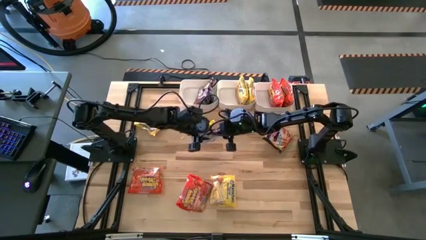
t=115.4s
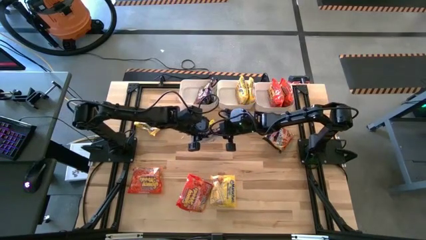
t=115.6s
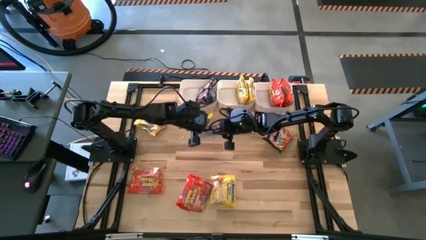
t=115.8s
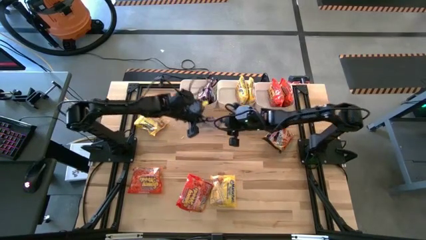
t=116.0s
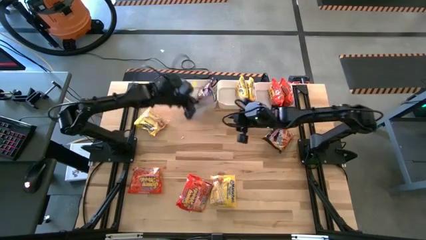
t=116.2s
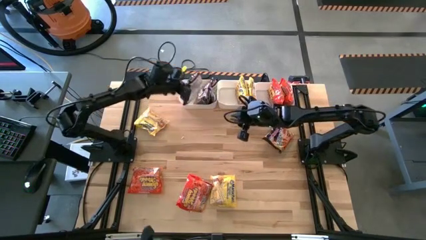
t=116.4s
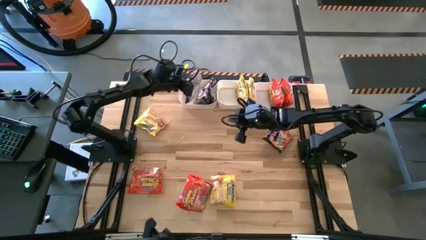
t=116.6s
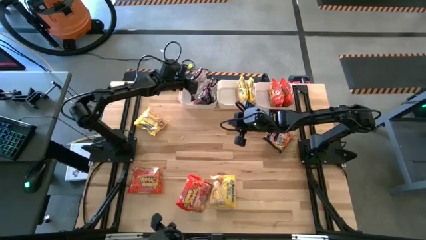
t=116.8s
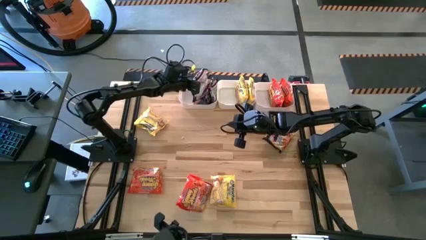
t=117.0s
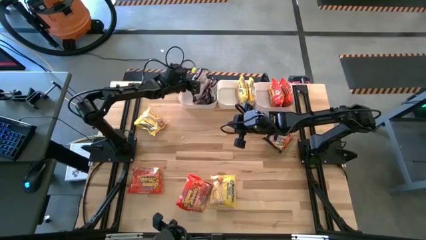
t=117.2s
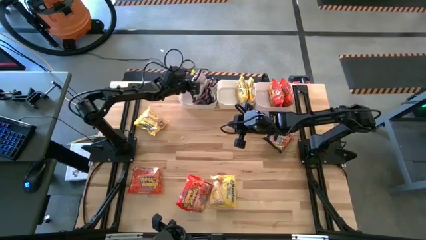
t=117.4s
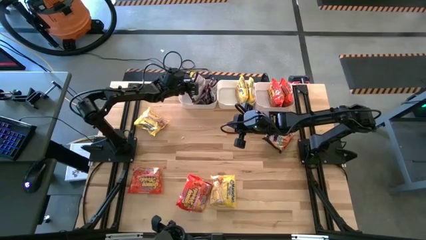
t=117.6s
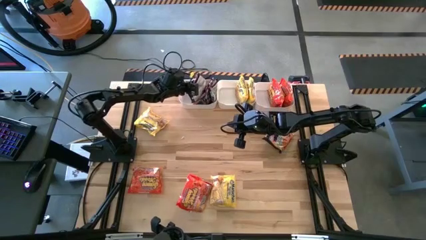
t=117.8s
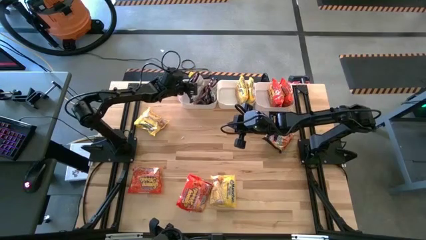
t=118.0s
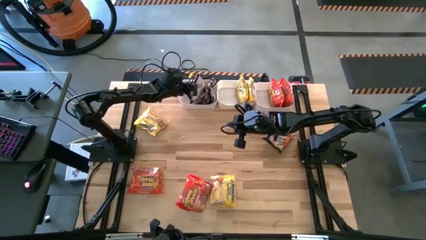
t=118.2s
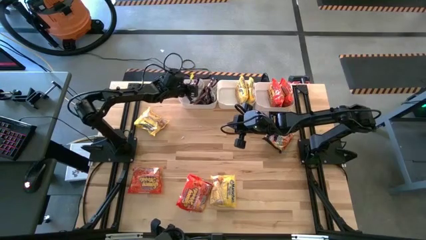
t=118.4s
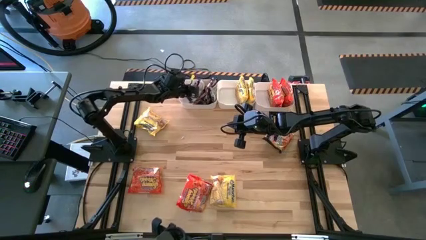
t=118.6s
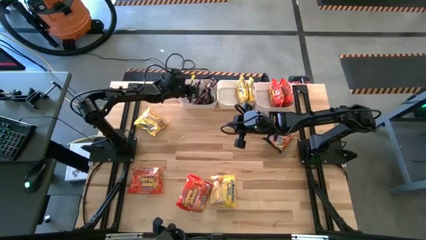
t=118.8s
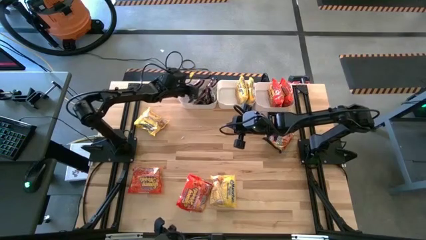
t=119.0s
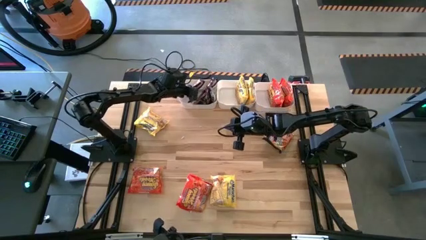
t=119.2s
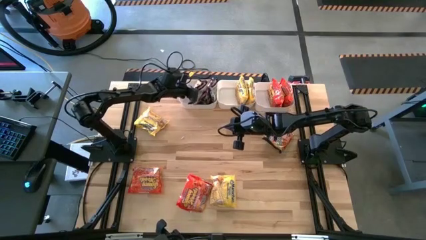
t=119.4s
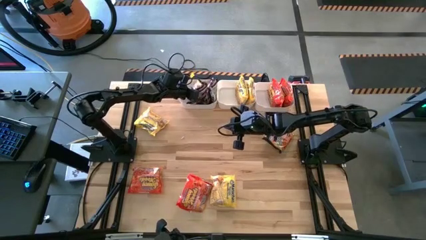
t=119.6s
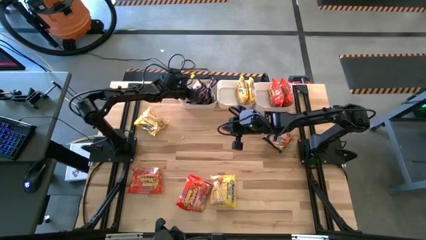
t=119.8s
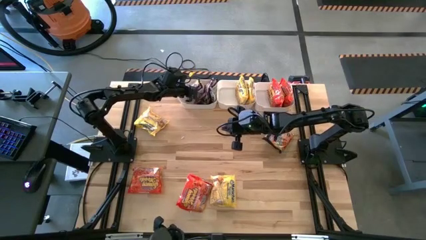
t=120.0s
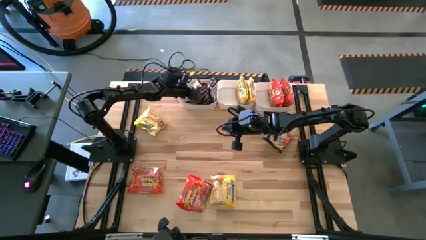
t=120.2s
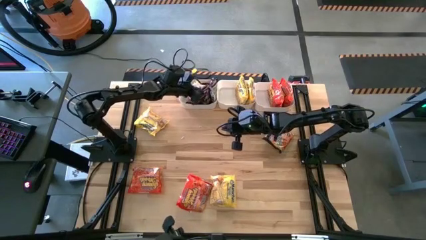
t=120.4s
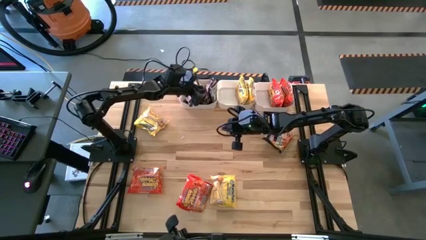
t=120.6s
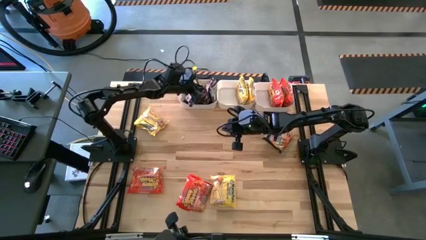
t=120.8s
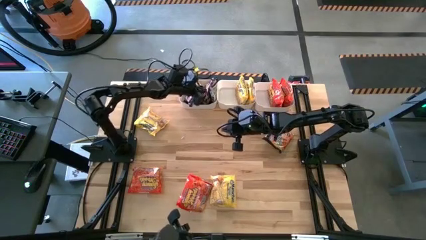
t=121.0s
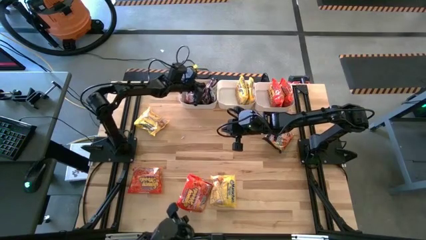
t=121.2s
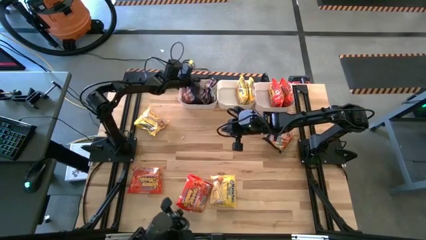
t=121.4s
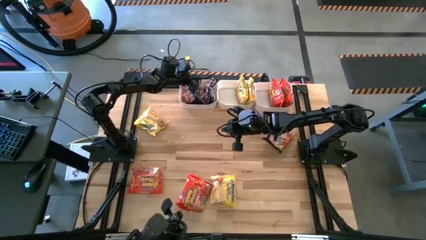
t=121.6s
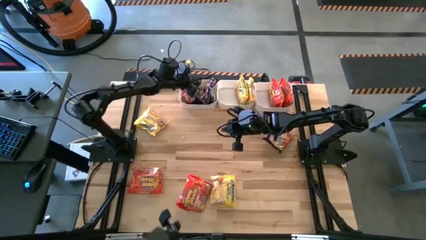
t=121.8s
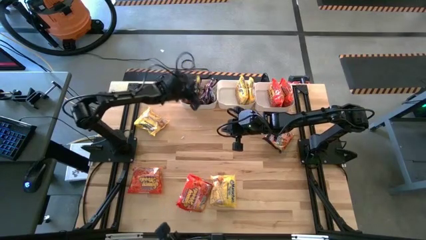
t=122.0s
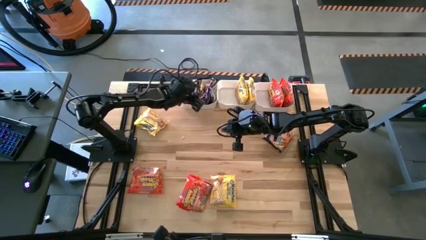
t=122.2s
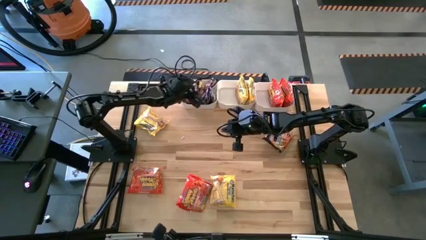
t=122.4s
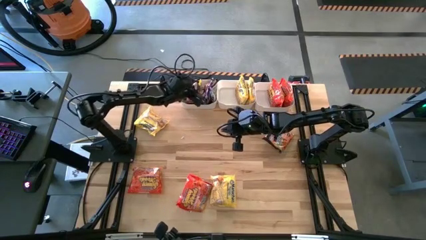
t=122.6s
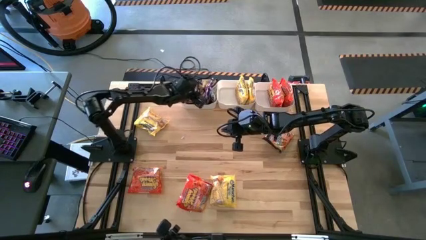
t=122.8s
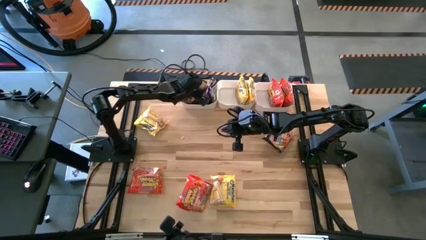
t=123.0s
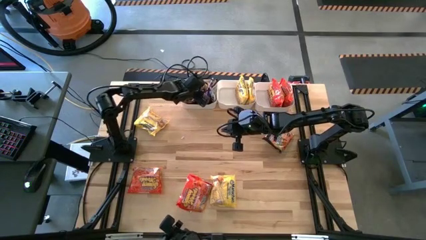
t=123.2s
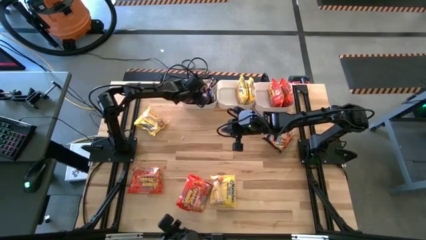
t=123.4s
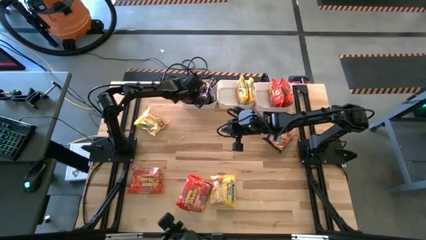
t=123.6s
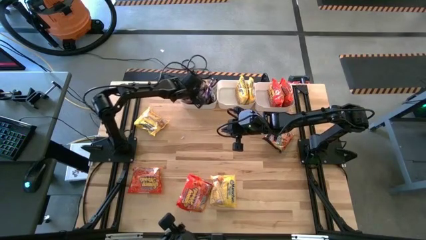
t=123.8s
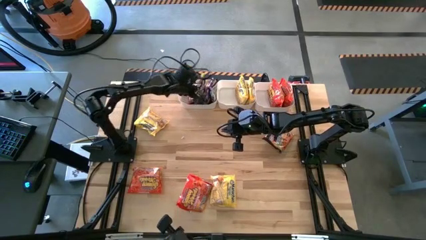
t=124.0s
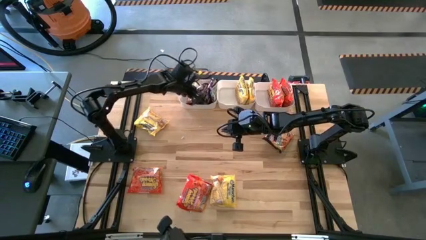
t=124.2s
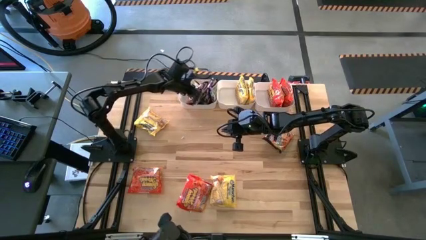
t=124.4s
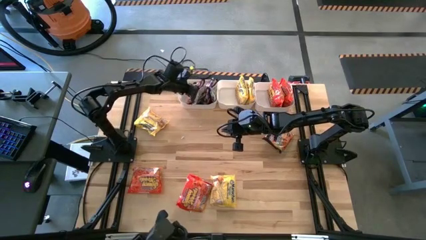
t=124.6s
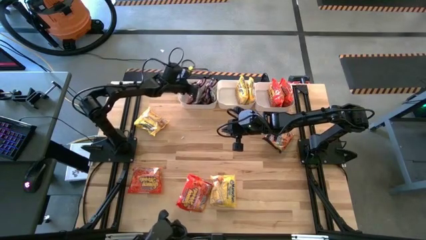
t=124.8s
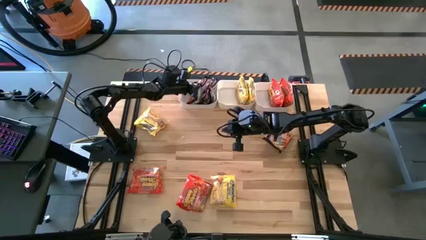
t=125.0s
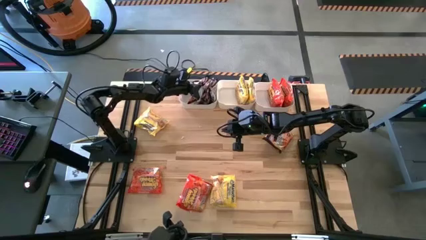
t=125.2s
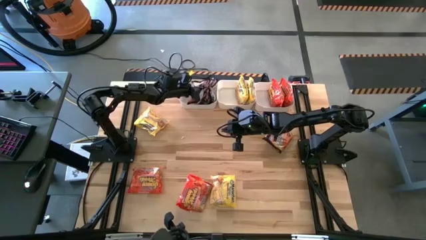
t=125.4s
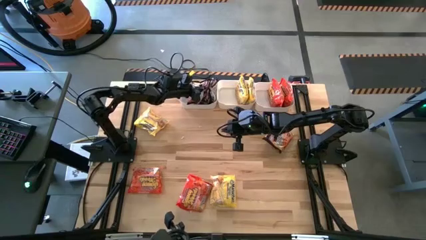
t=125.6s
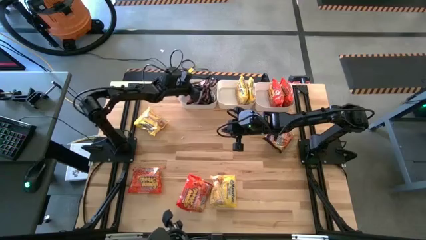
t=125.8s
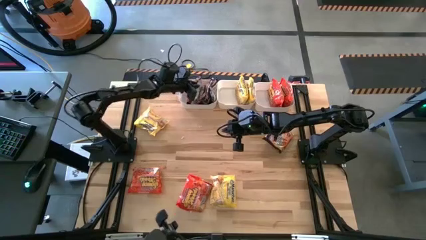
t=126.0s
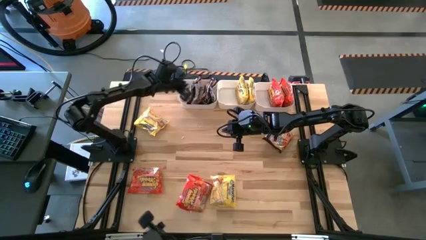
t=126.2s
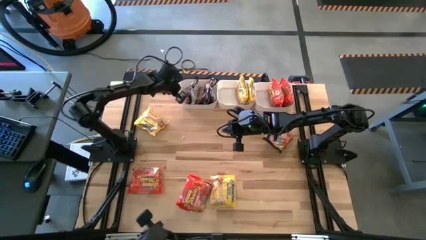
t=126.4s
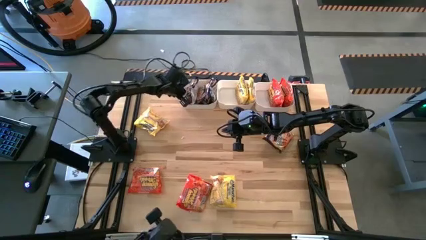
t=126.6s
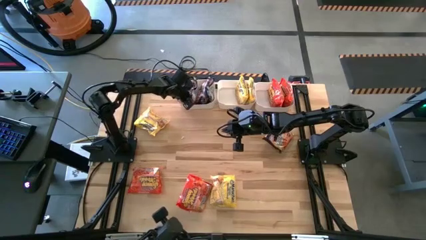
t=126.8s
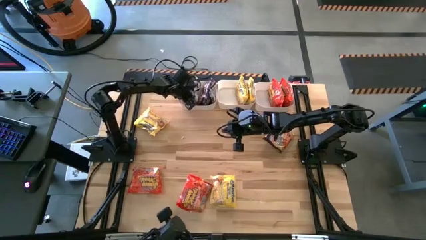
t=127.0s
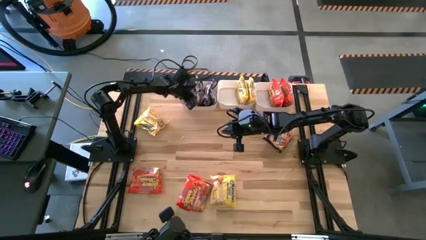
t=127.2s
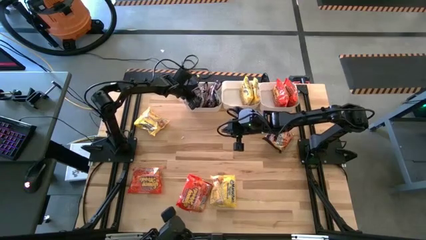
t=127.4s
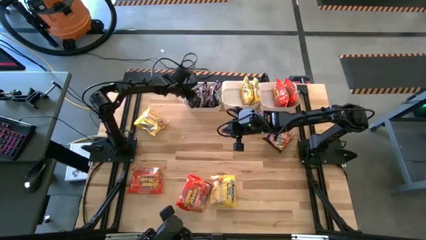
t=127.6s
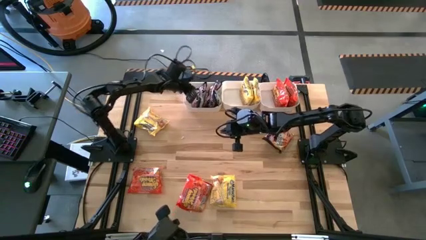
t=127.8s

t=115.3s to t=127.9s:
Task: Sort Maruchan noodles
Put the black noodle into the left white bin

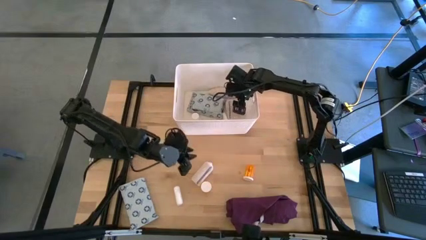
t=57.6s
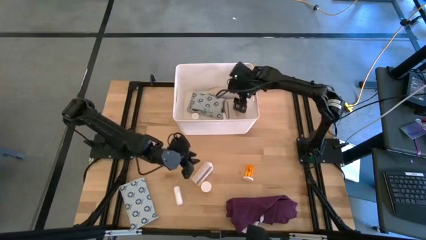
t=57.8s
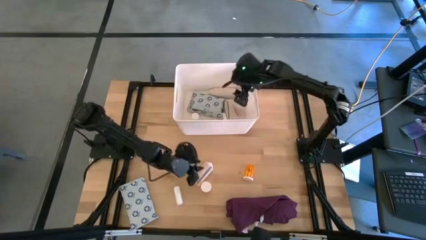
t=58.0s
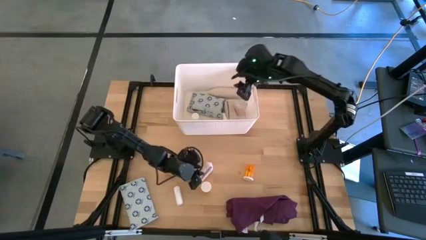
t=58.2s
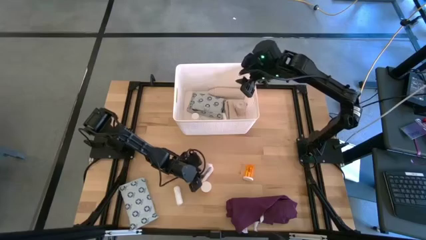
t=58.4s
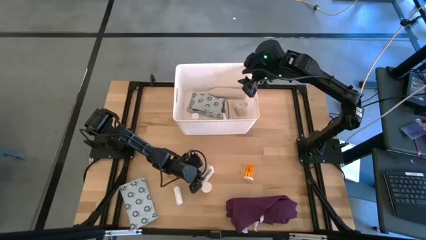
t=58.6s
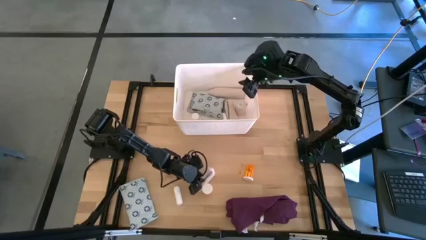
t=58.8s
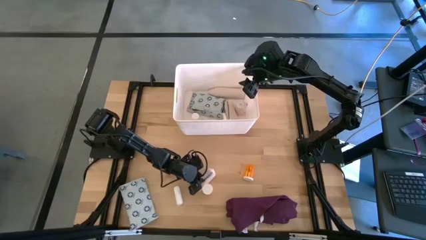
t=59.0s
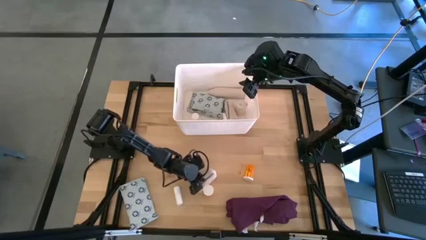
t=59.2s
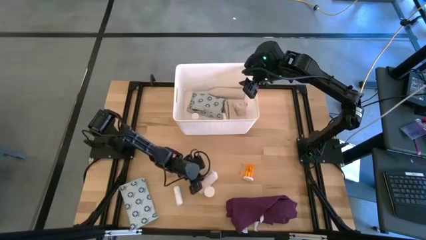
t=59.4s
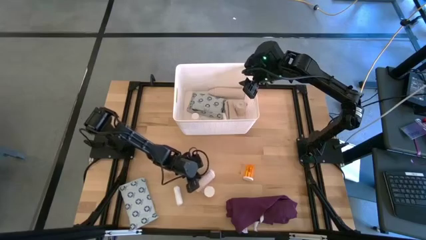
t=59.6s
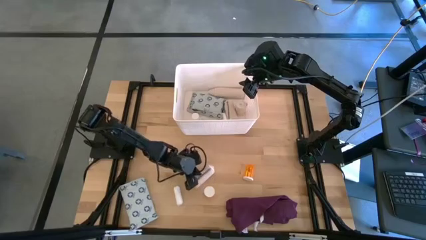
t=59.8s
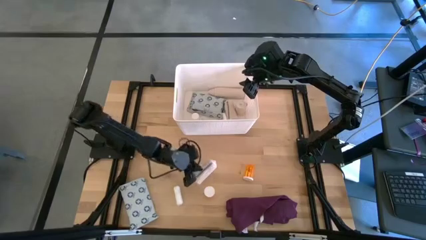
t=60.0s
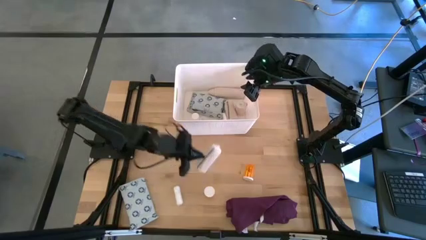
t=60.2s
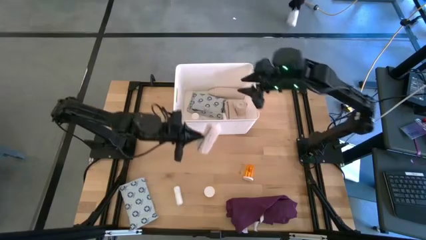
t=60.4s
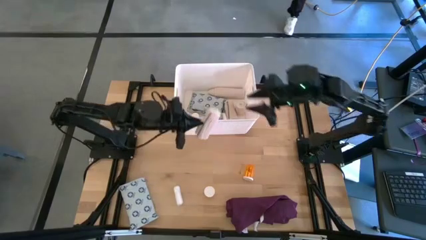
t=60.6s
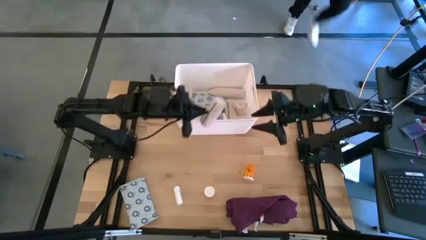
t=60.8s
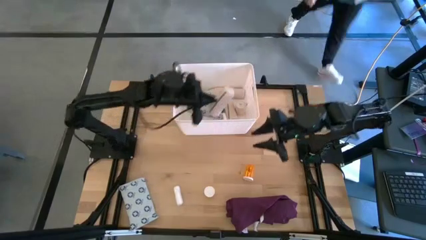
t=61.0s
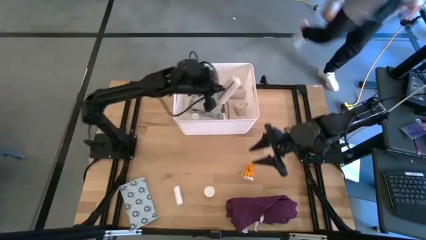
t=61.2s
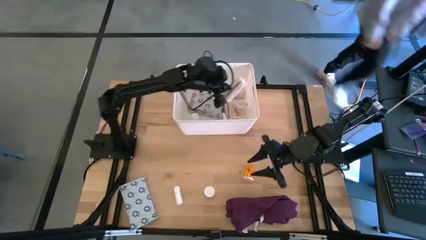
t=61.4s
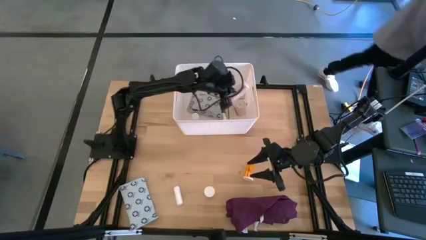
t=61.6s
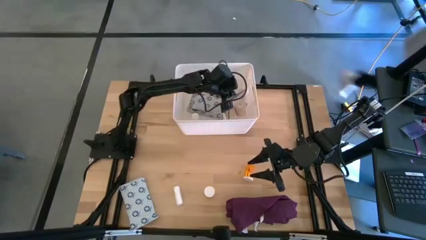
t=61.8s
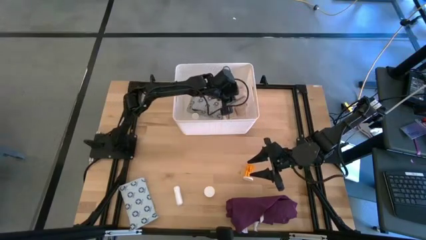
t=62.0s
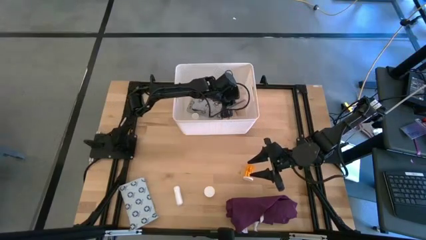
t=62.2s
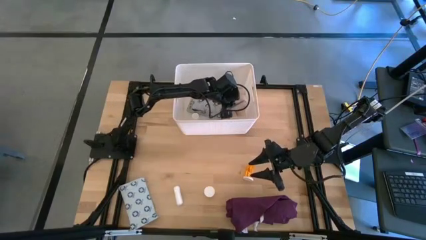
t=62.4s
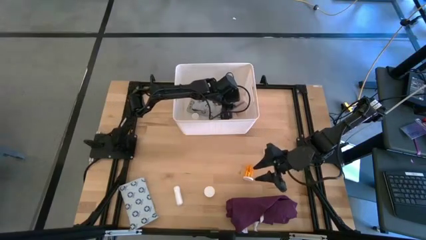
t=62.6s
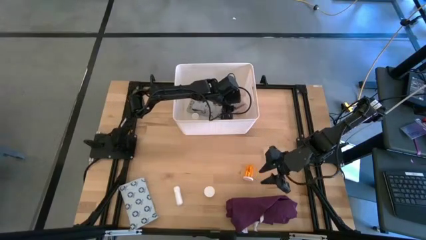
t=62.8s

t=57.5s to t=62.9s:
Task: Pick & place medical supplies in basket/bin
Put the light brown and blue bandage into the white bin
